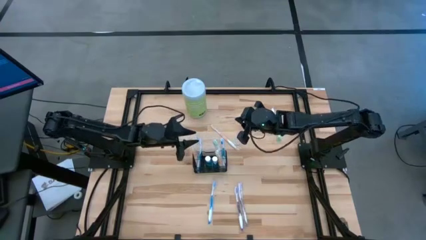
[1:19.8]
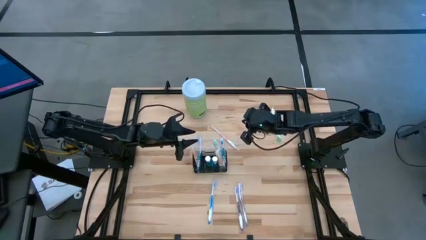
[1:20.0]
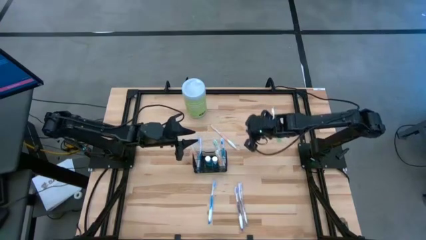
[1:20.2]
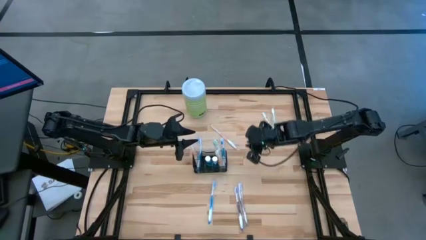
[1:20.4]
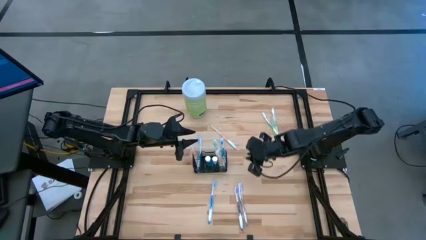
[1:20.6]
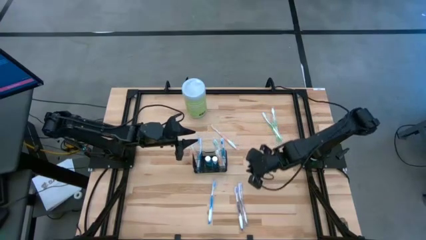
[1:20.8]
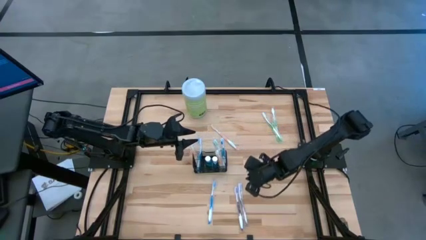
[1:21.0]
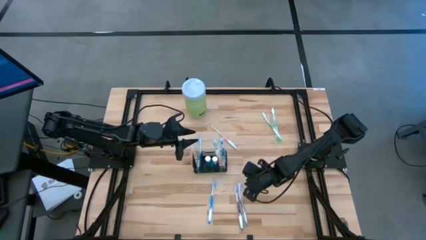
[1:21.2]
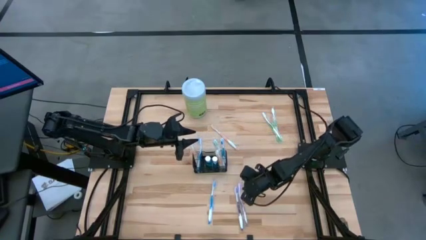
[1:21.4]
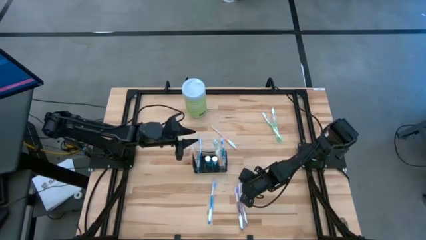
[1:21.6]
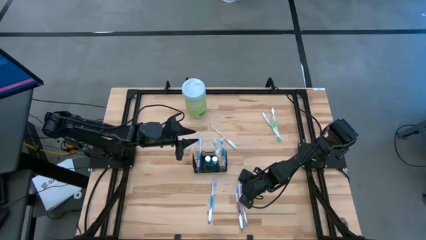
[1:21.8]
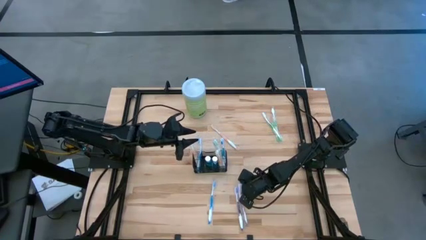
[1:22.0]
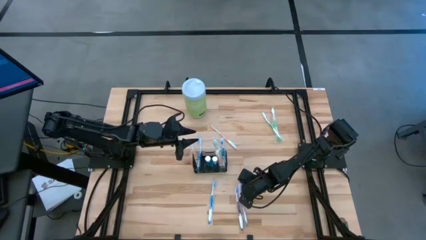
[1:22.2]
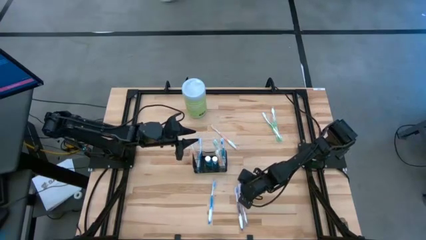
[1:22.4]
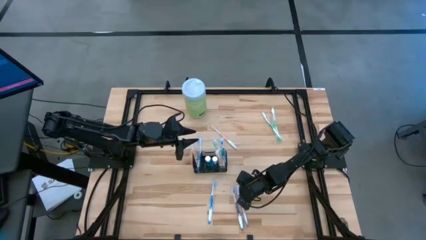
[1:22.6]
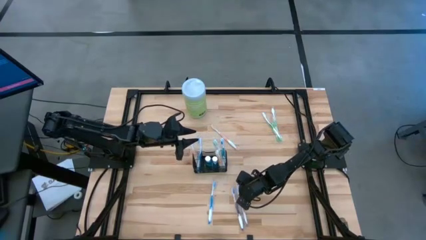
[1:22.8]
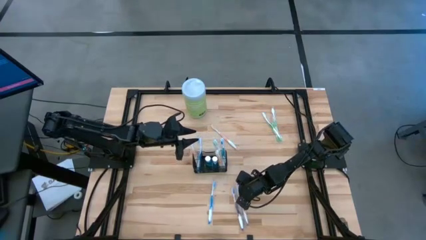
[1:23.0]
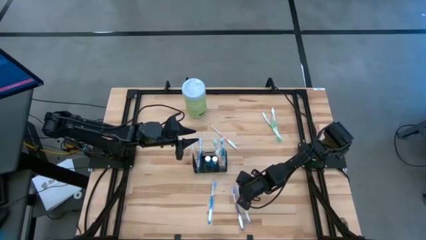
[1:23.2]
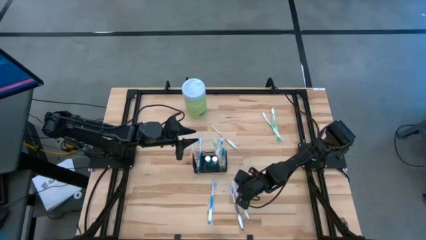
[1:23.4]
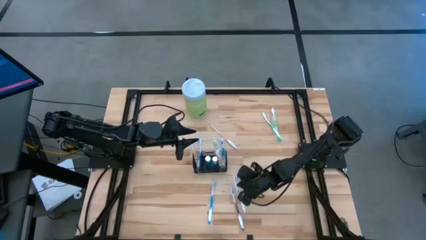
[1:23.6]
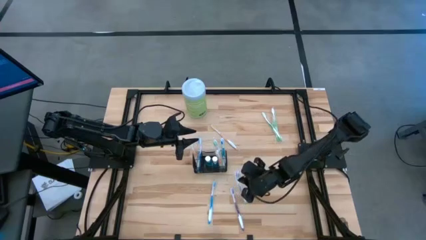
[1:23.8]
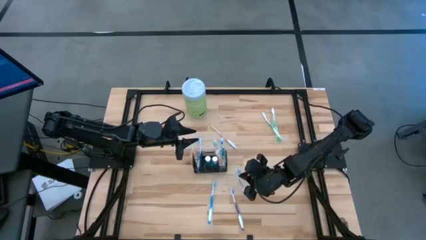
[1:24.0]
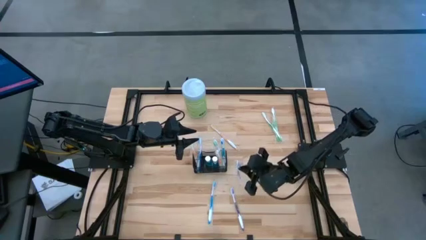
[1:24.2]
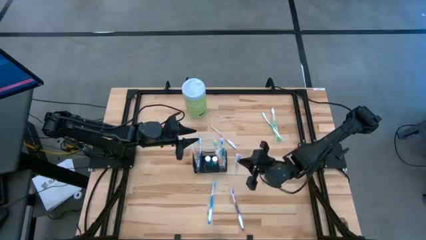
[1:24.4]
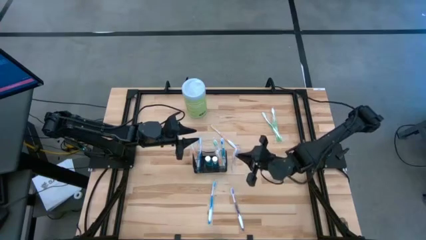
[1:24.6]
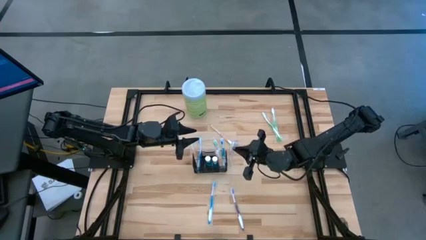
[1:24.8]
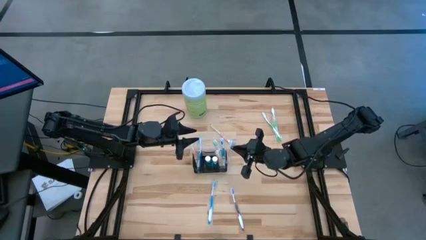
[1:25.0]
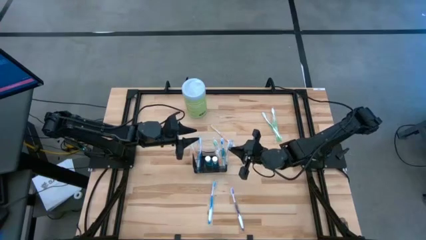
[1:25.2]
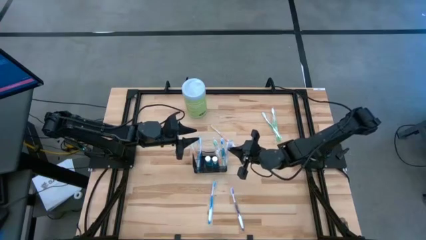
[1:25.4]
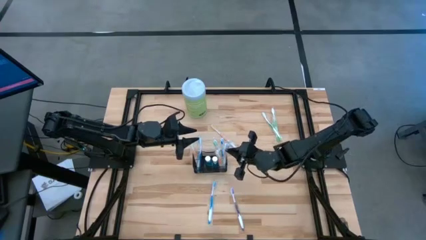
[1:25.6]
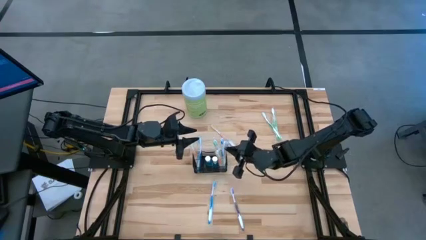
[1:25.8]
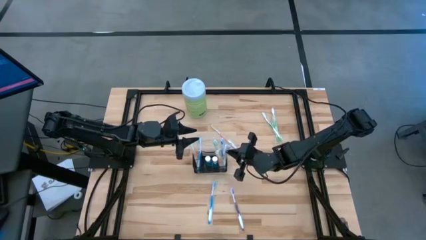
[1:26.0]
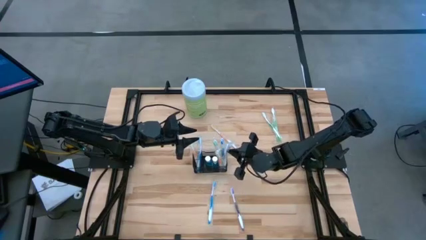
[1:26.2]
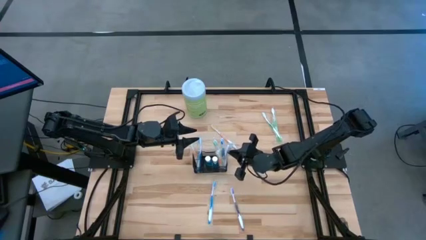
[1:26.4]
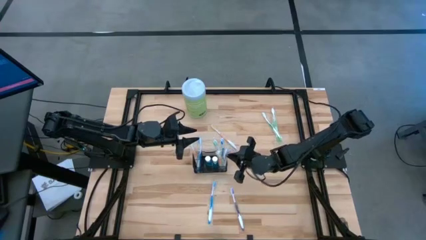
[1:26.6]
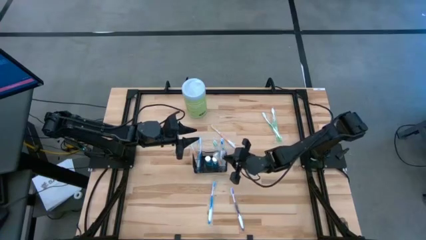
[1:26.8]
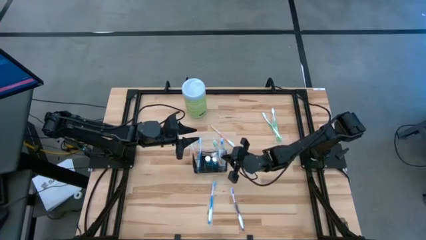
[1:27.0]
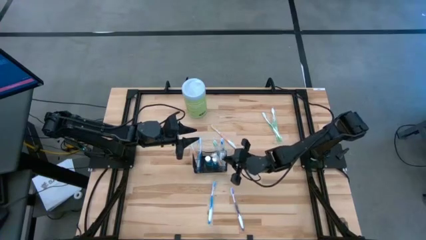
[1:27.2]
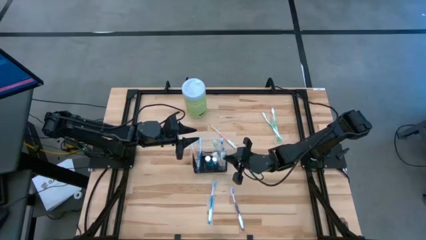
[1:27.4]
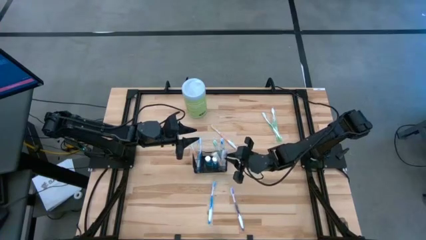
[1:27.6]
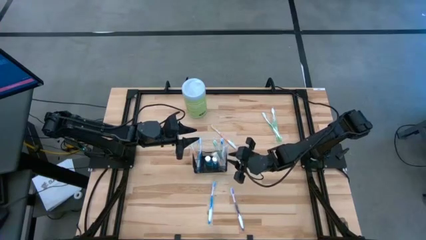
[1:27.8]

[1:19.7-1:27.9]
Task: Pick & Place toothbrushing station
Put the right purple toothbrush into the wire organizer

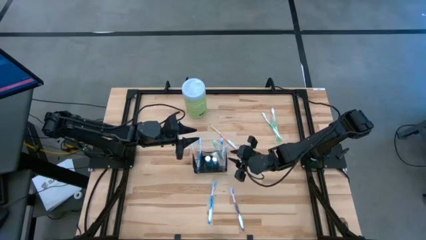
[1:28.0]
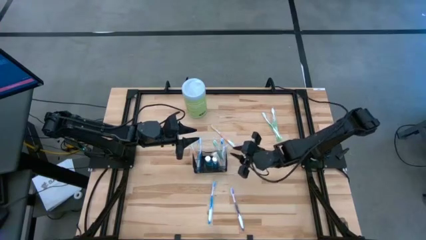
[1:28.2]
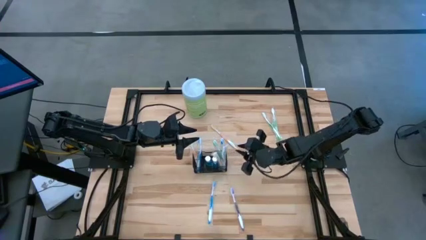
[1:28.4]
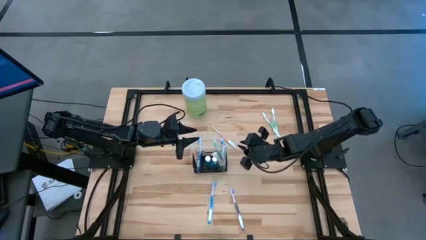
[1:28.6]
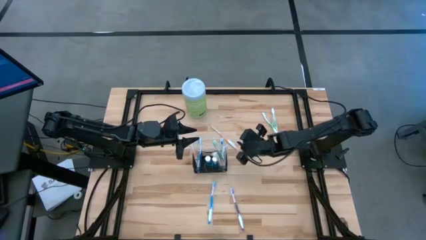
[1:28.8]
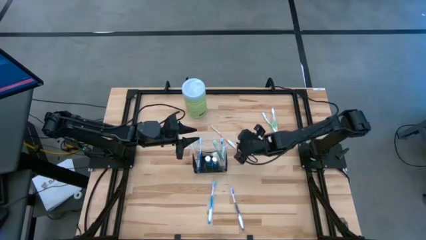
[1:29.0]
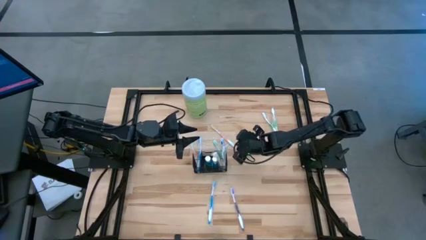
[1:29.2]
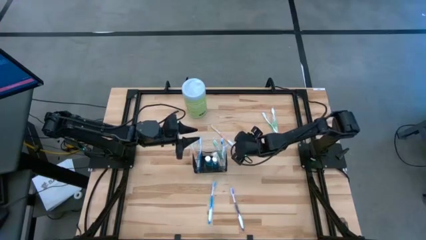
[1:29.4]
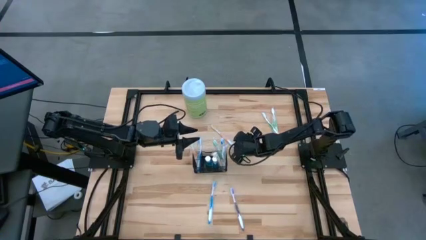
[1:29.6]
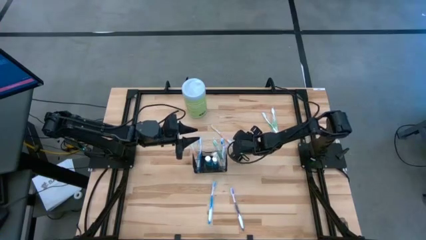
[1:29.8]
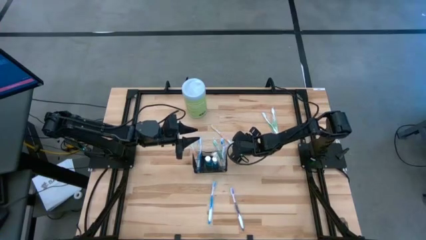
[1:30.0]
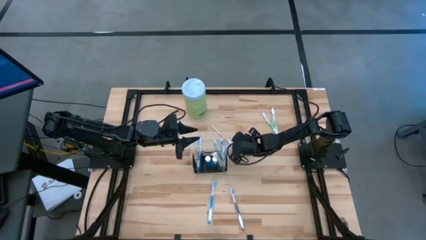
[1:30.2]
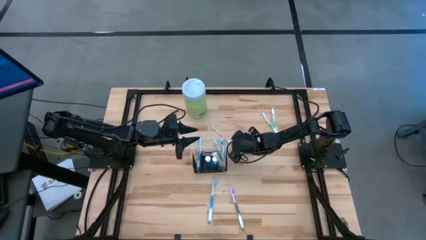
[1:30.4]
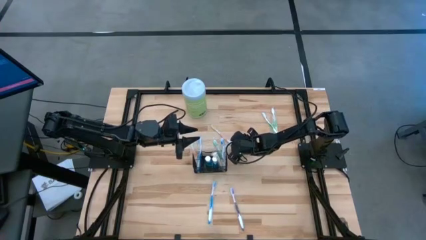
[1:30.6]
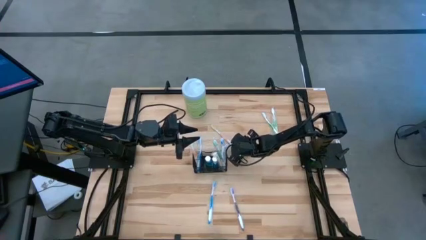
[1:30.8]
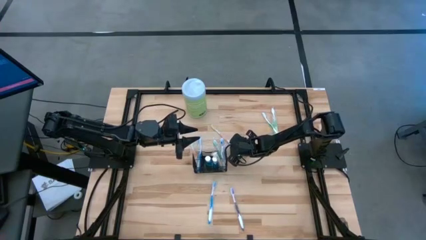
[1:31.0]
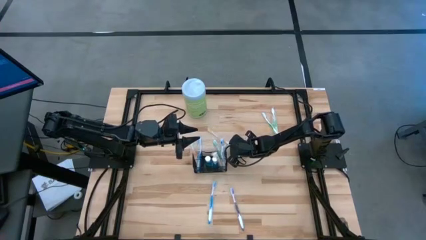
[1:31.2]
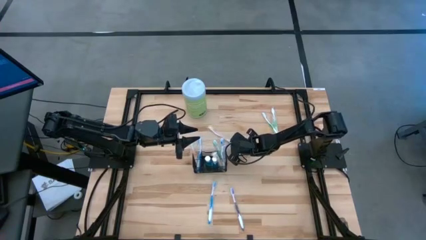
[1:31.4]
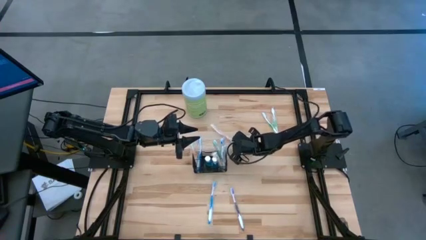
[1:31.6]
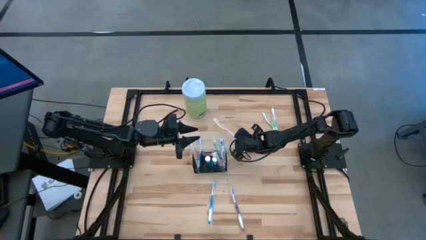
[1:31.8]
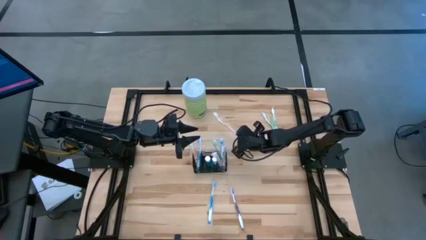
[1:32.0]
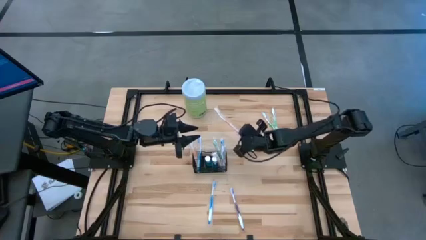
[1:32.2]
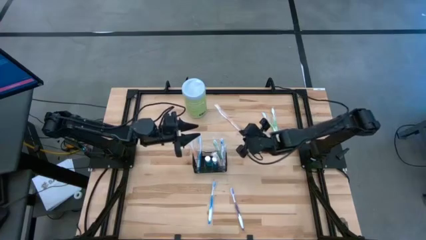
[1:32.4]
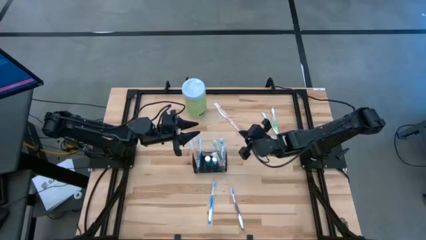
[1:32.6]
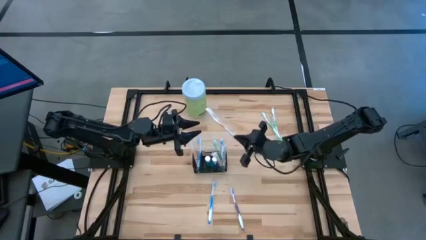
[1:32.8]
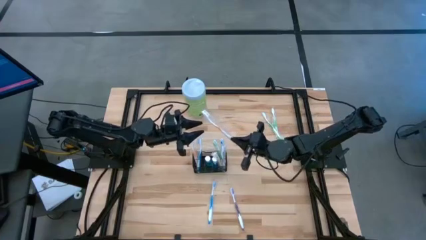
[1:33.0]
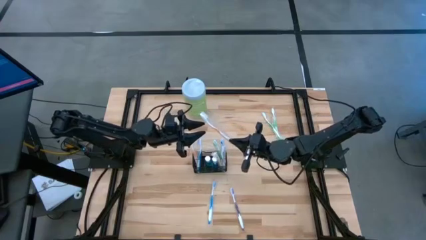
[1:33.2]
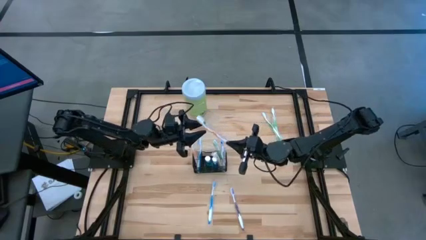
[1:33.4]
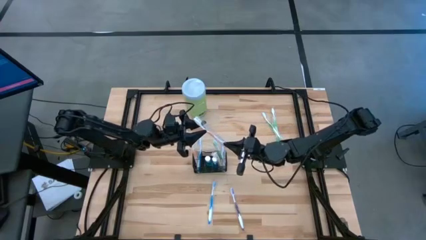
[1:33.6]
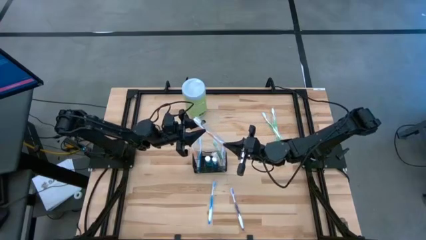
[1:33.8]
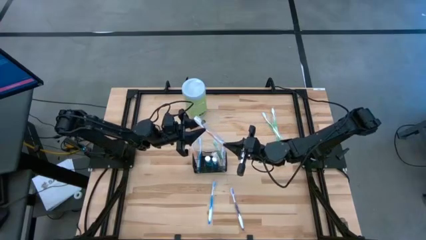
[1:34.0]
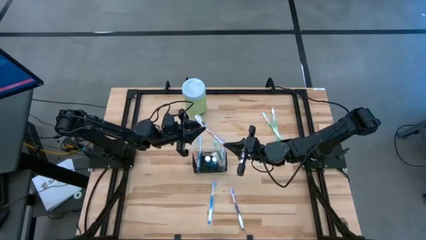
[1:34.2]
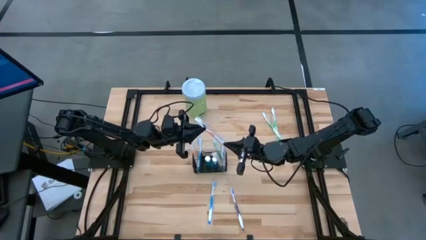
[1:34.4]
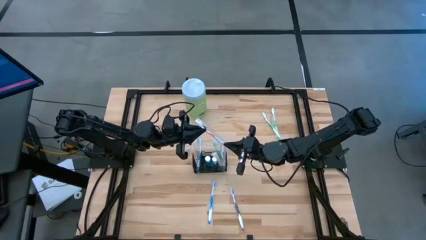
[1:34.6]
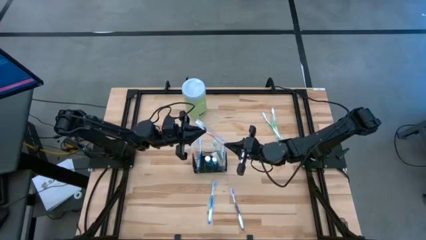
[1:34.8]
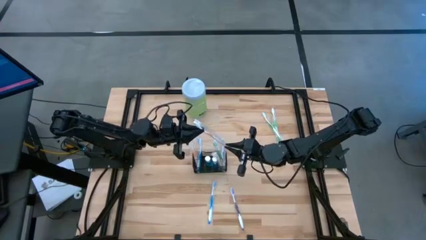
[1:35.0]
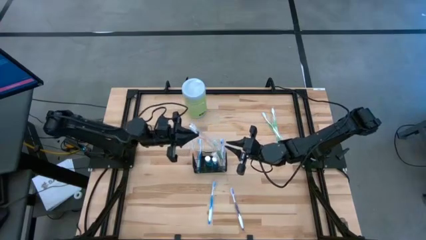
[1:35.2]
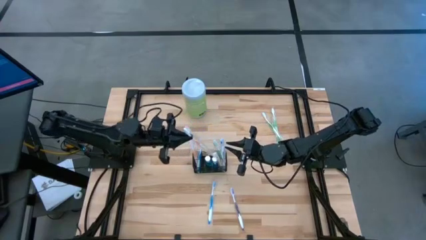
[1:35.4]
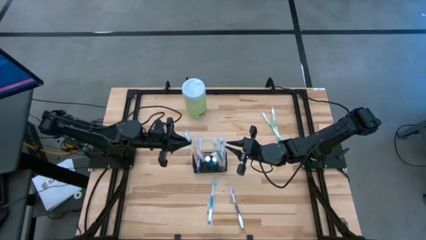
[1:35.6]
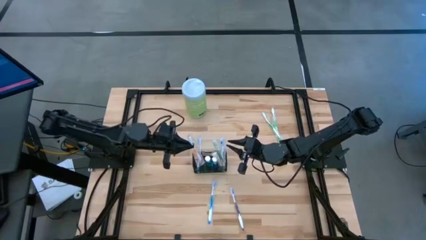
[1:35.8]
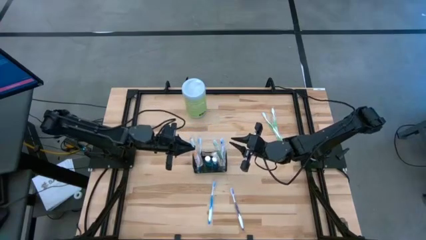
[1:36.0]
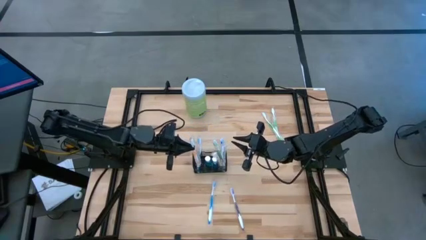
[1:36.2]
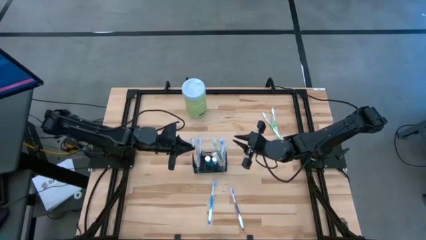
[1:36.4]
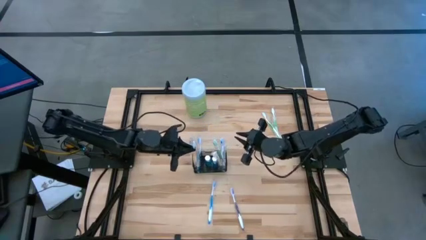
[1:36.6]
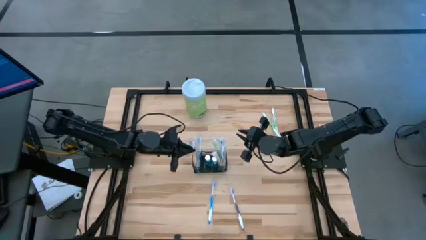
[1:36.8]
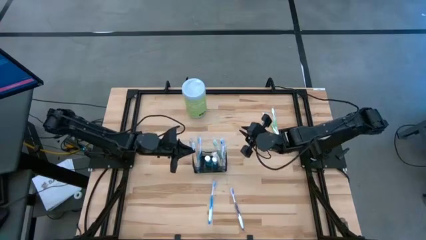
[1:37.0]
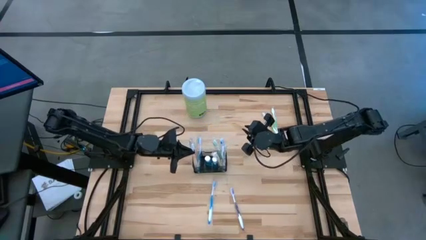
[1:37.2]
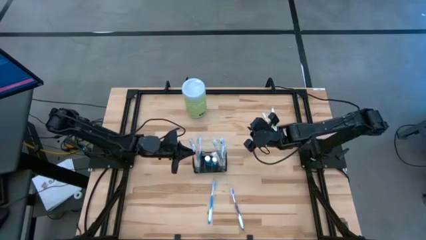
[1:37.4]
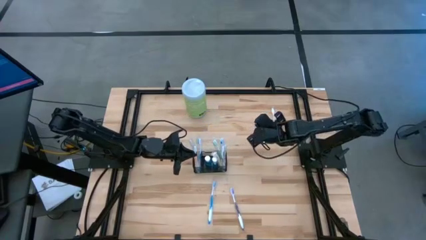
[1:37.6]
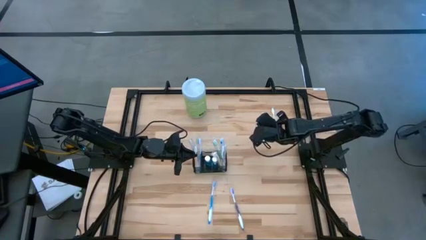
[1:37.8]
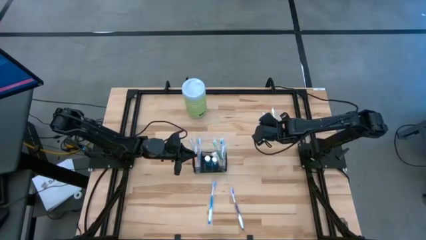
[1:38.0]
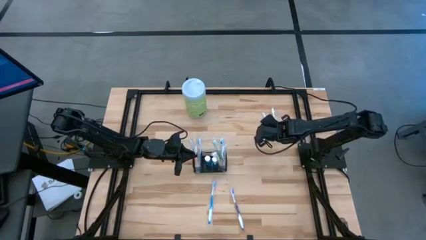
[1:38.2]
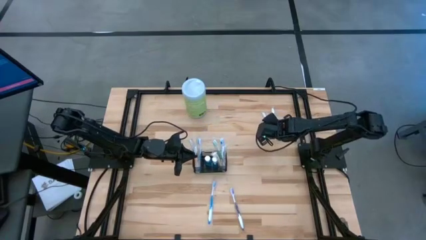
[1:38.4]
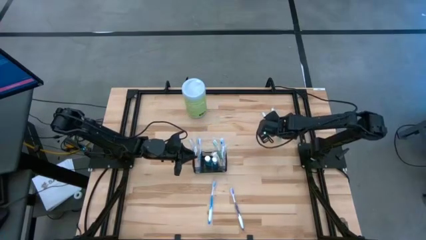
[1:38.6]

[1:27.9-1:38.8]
Put the orange toothbrush into the wire organizer
